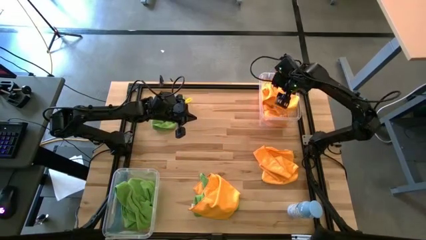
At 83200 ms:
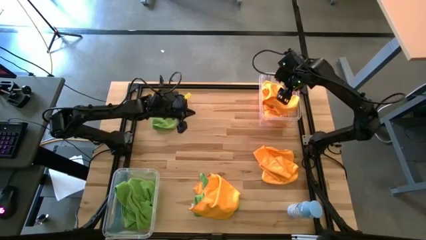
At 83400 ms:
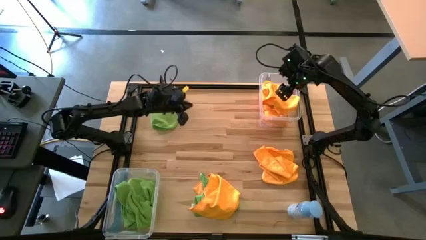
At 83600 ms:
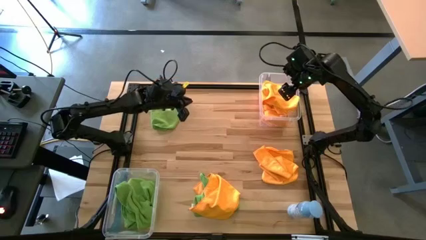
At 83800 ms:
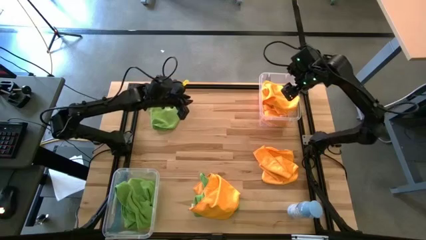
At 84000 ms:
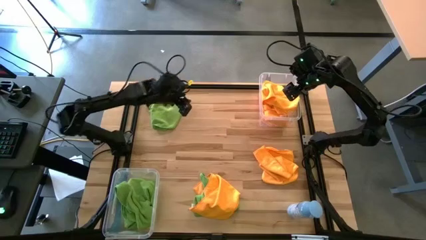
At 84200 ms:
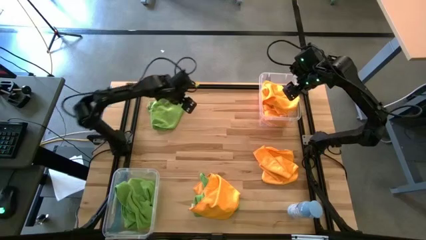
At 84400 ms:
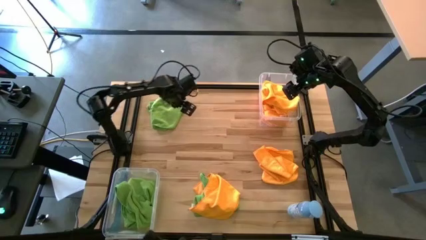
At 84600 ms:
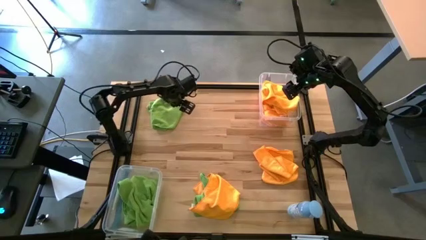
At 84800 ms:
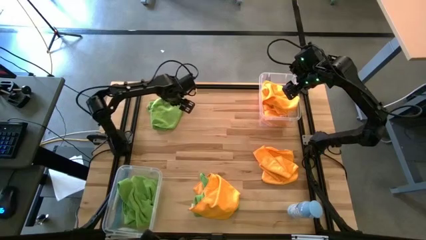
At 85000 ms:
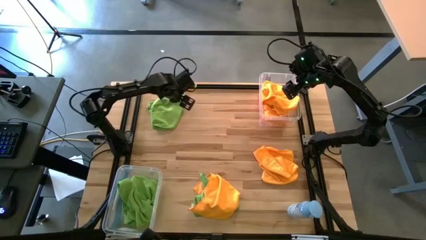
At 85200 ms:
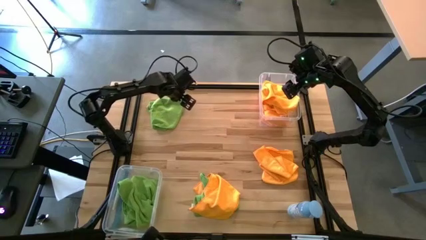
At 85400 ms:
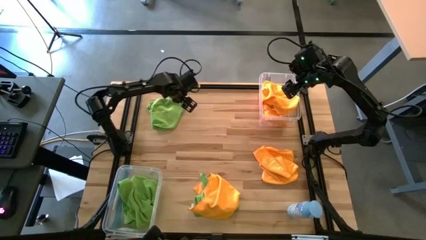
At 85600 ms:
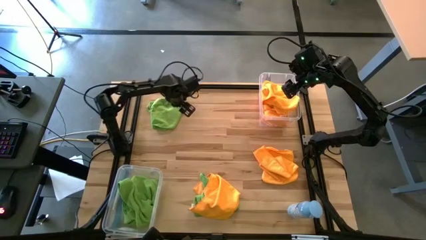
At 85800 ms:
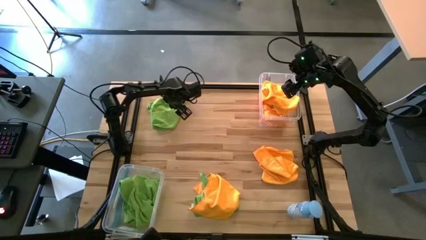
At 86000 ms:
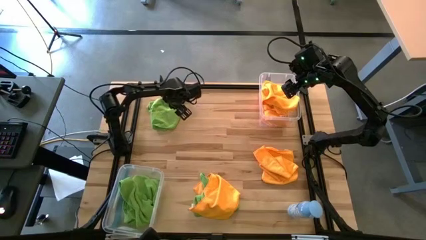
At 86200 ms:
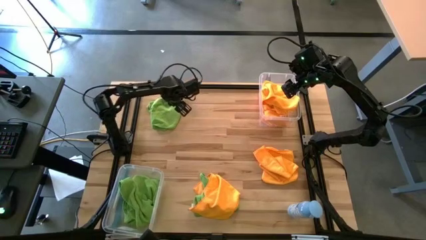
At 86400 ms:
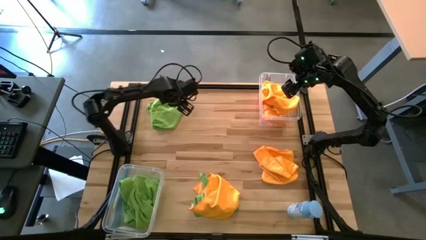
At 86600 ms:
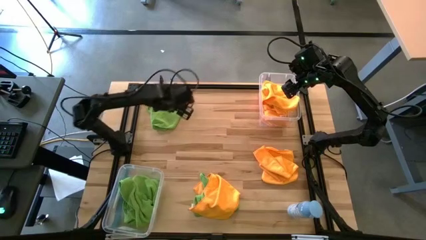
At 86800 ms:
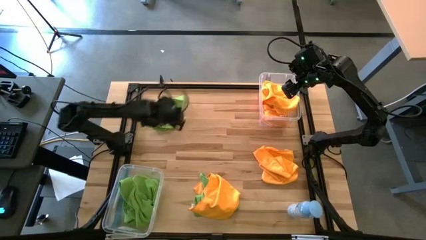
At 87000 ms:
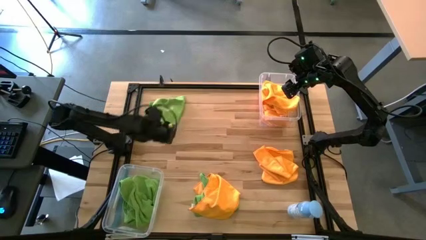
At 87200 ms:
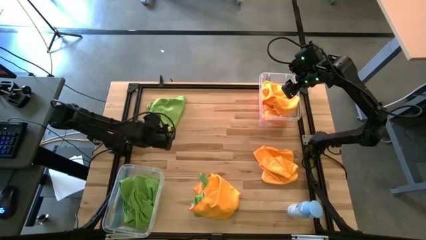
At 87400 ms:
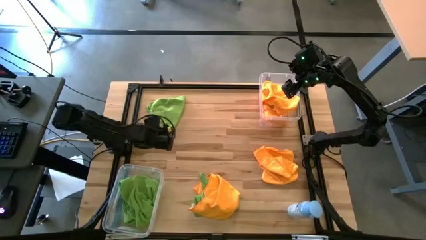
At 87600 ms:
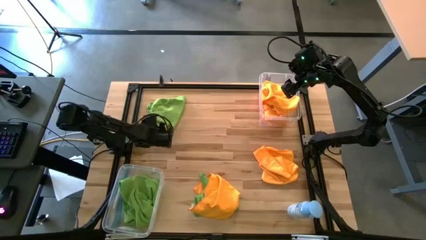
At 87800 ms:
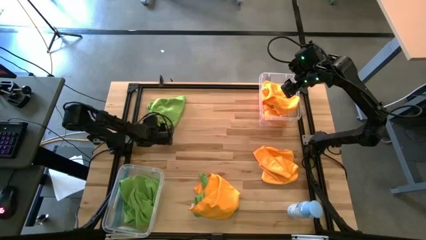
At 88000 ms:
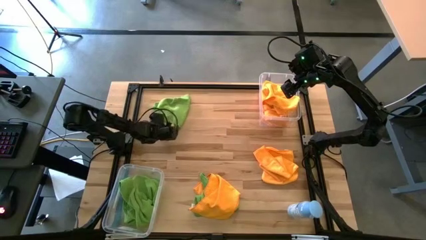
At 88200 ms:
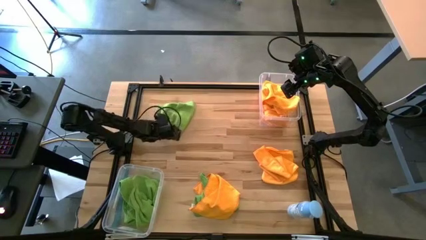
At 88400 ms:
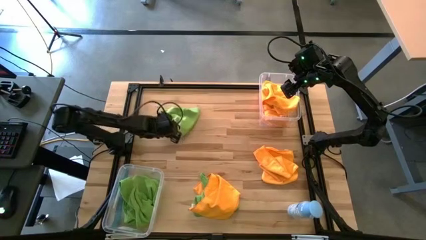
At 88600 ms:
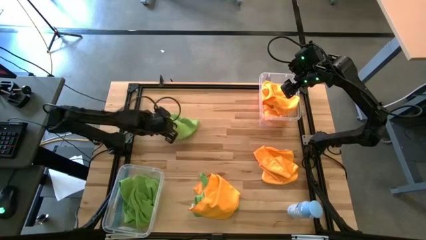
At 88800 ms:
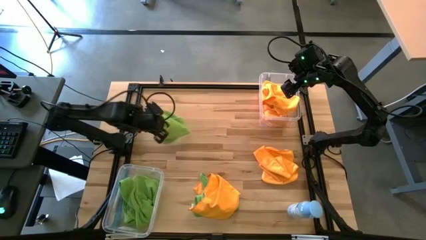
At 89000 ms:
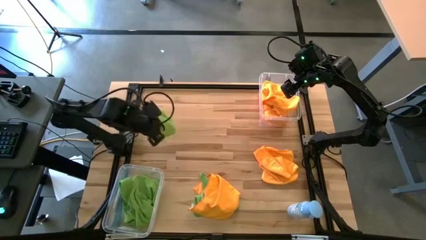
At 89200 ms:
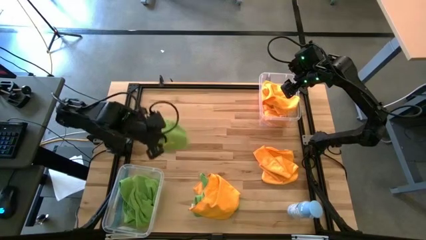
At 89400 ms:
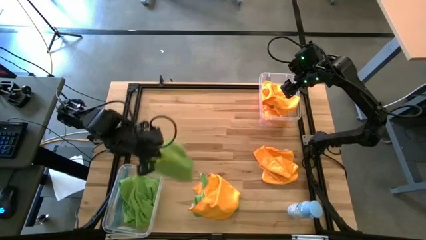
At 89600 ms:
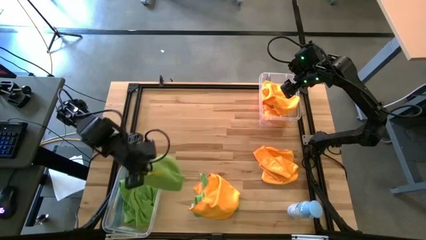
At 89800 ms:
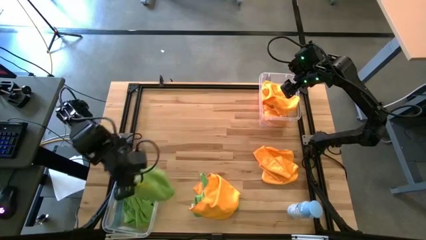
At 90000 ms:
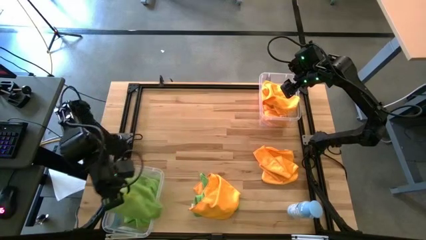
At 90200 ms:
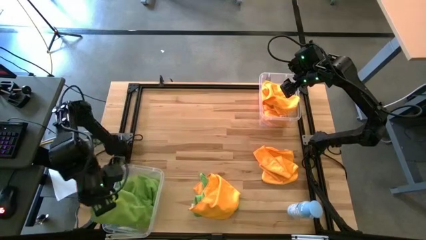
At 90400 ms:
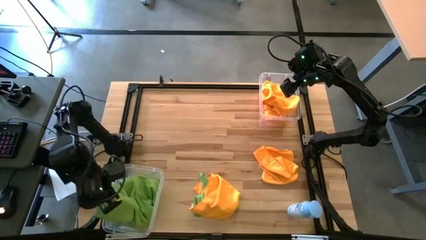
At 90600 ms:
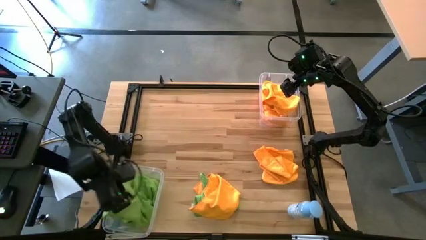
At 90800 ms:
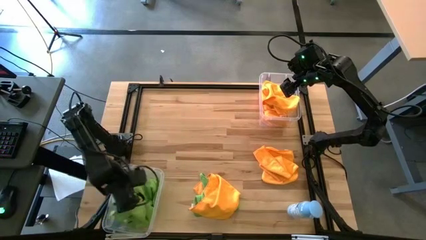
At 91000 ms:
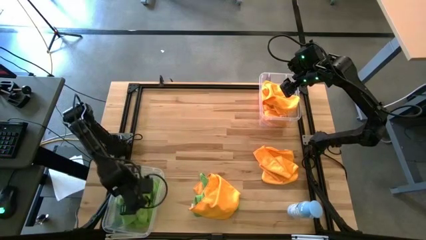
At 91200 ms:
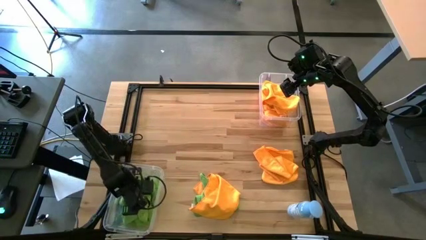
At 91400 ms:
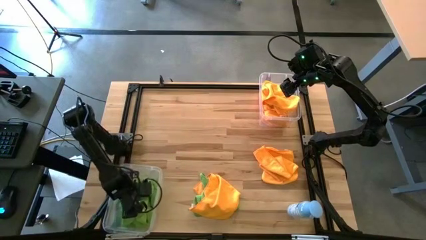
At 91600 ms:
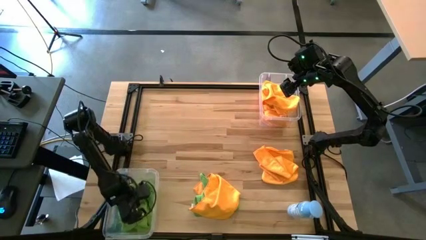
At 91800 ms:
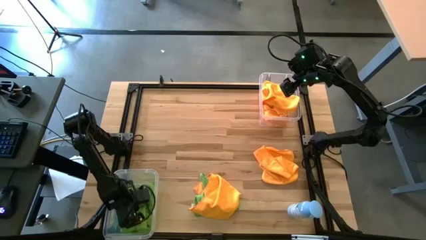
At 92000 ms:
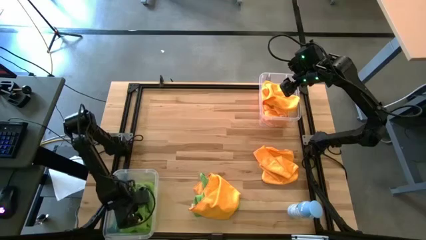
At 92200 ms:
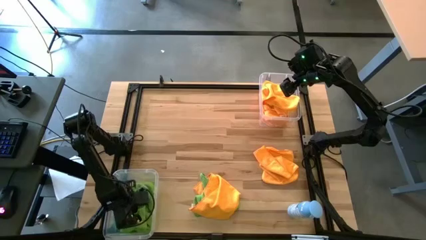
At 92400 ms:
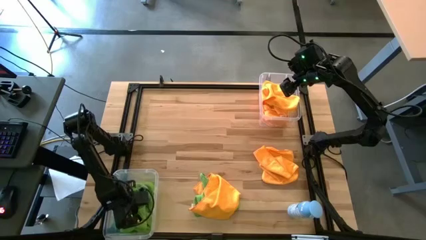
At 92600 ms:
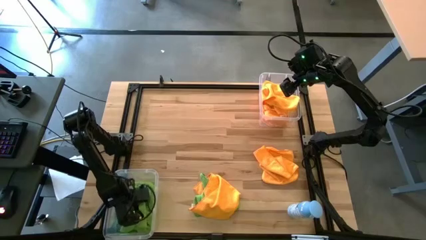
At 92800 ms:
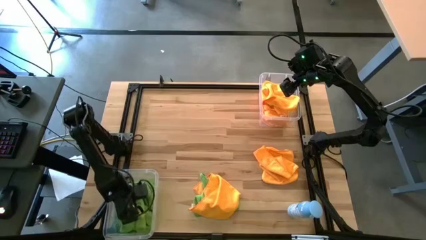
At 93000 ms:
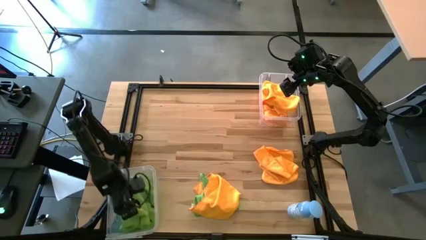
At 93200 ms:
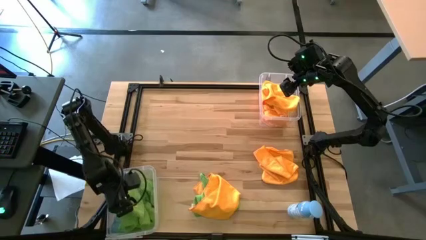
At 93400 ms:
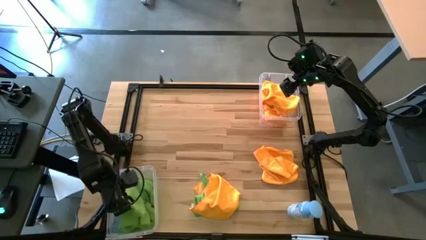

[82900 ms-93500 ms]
Task: Sort microfiber towel by color & place in baskets
Put the green microfiber towel into the bottom transparent bin

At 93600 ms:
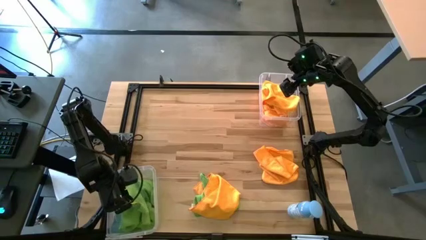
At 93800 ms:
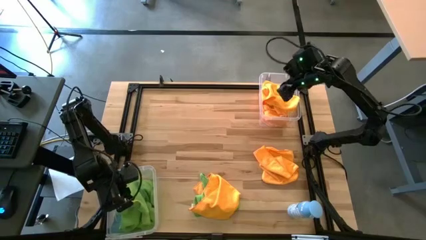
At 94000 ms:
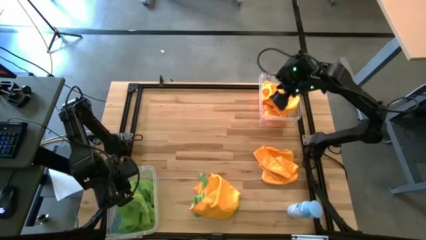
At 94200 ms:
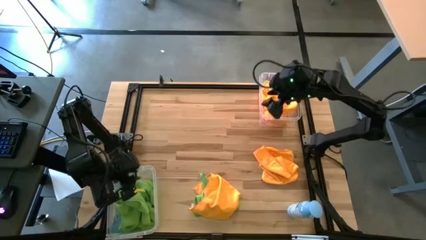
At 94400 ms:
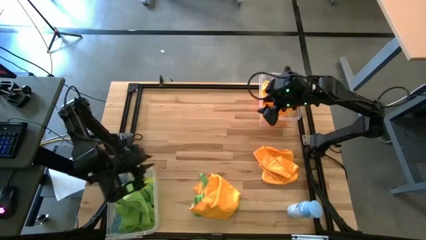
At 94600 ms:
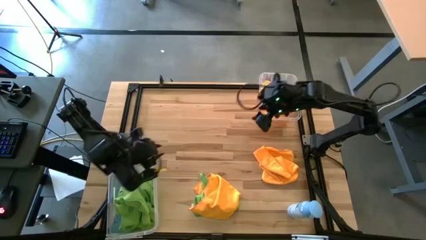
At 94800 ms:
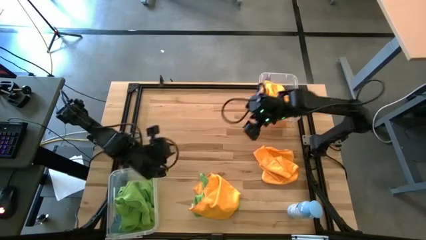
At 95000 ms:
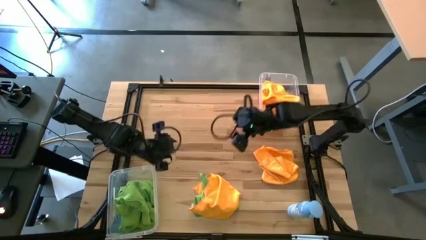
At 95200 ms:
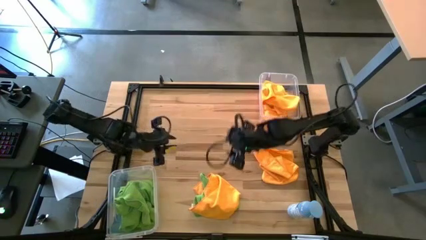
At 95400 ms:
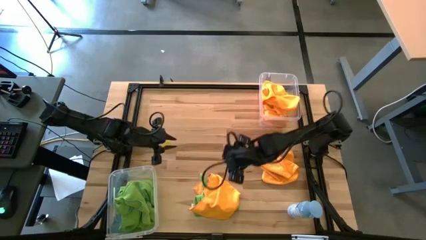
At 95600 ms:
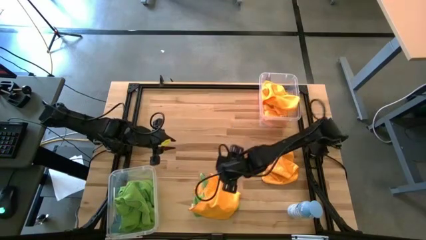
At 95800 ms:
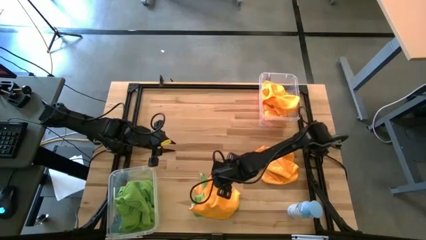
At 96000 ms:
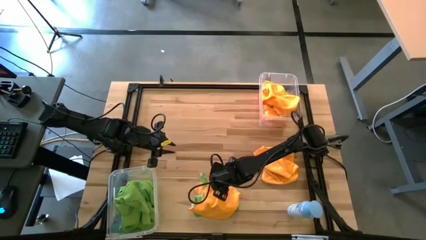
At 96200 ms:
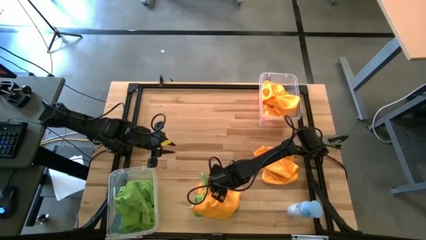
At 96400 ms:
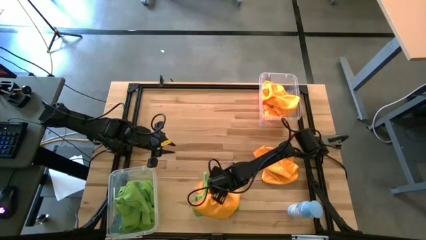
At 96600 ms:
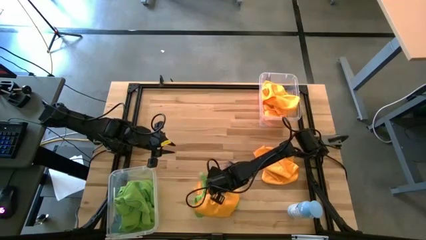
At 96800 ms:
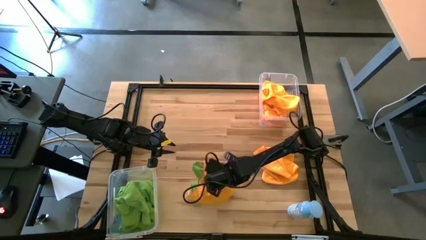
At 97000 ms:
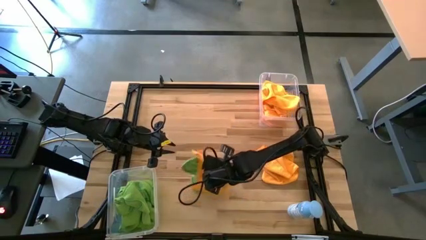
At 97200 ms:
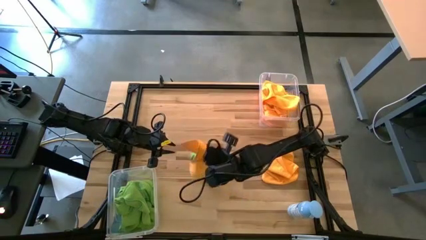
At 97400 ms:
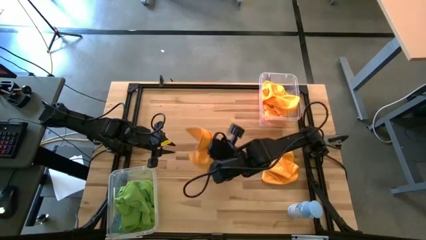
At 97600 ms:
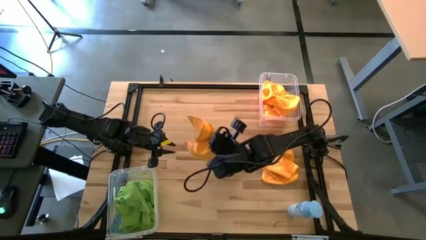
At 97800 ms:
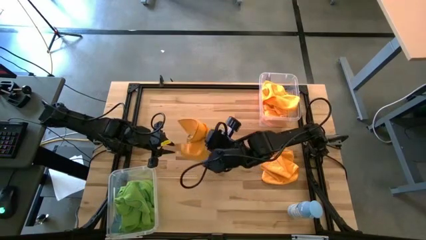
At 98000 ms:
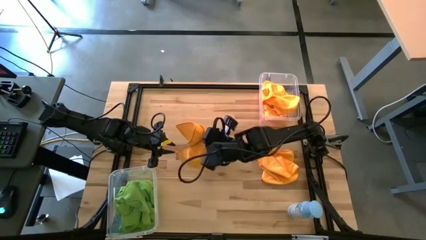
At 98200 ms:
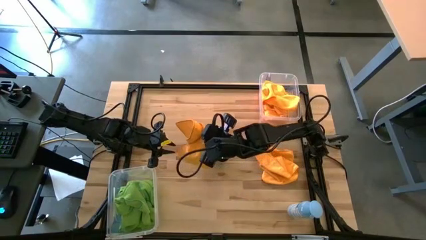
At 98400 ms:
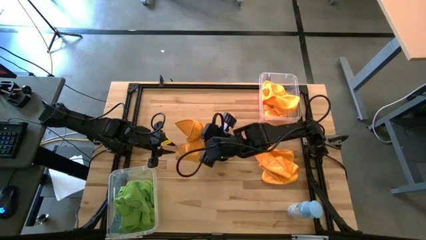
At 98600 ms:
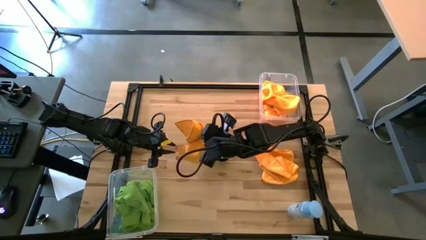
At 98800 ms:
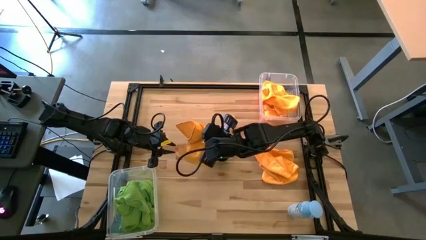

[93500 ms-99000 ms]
Put the orange microfiber towel into the top transparent bin
